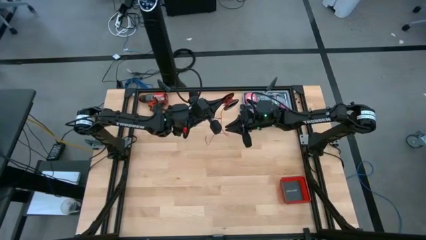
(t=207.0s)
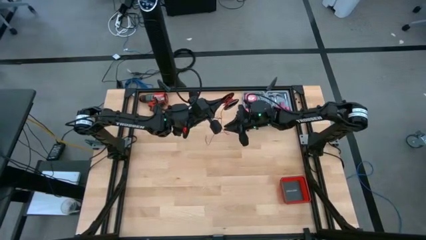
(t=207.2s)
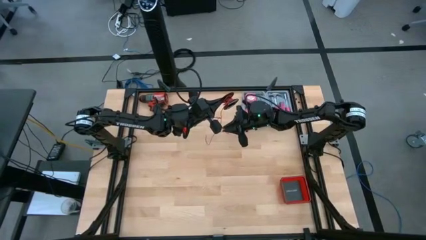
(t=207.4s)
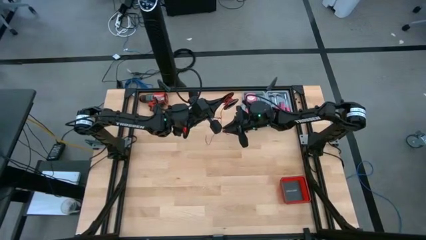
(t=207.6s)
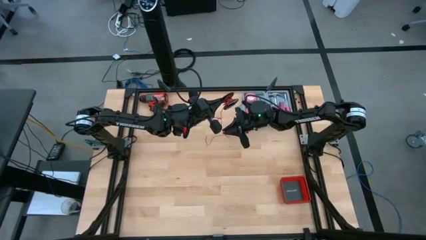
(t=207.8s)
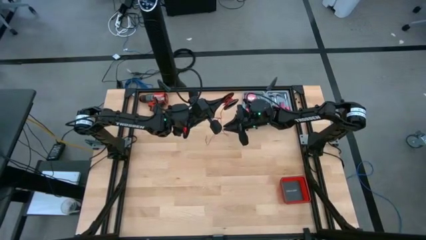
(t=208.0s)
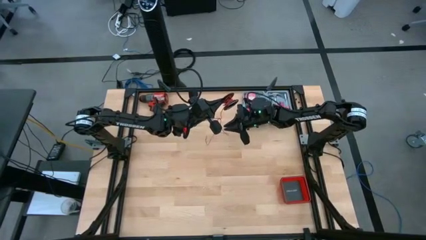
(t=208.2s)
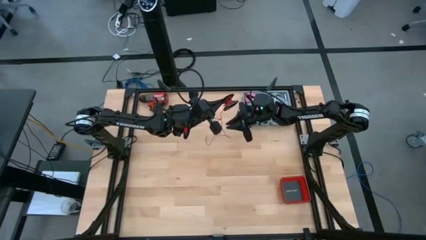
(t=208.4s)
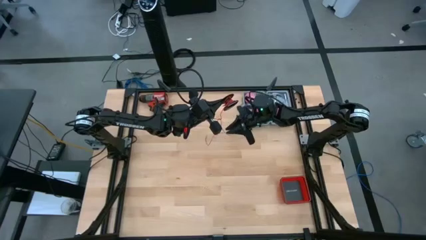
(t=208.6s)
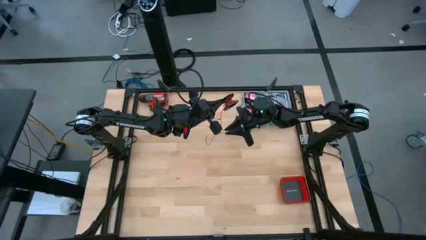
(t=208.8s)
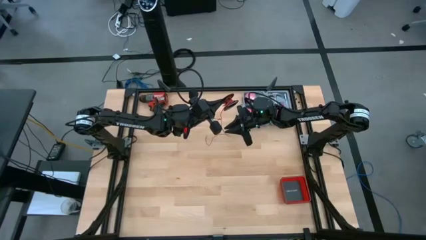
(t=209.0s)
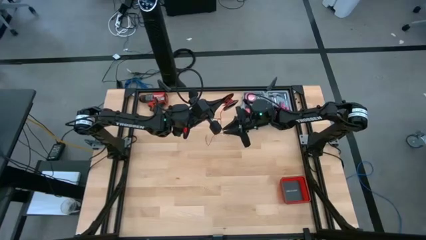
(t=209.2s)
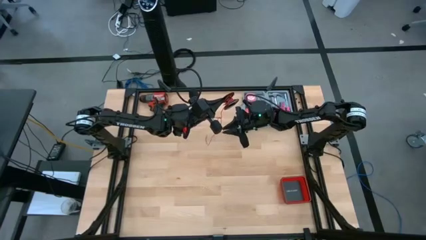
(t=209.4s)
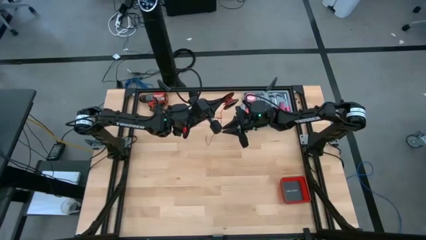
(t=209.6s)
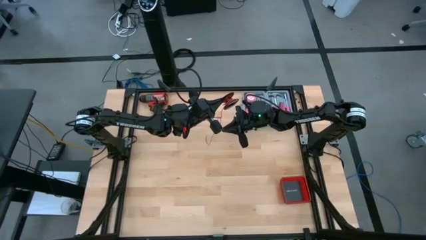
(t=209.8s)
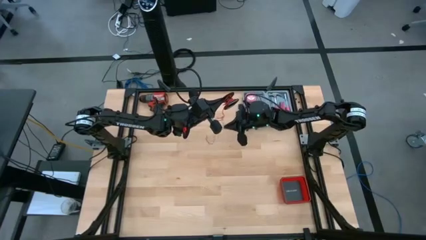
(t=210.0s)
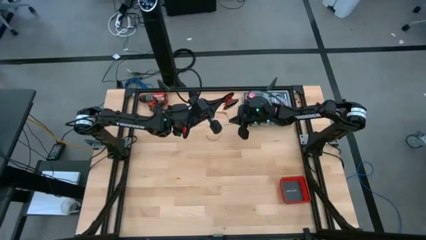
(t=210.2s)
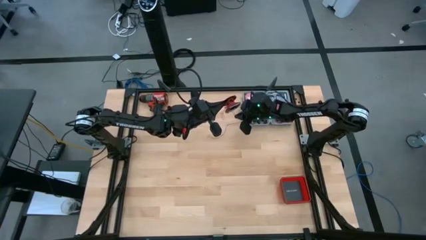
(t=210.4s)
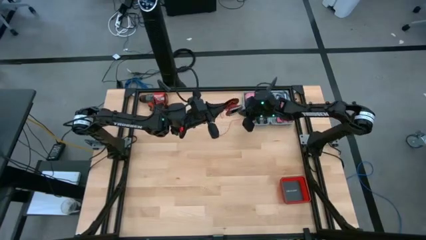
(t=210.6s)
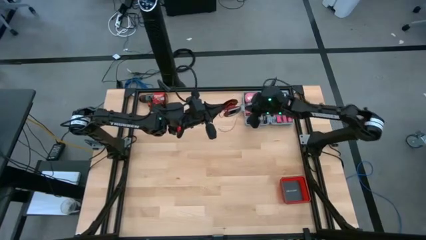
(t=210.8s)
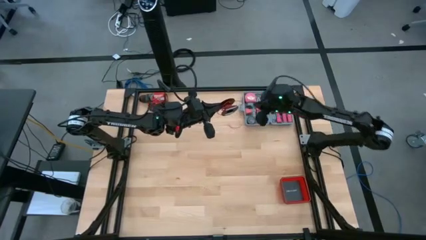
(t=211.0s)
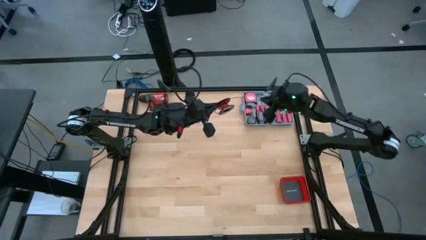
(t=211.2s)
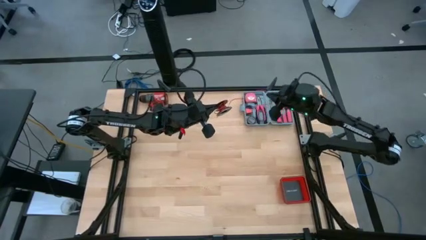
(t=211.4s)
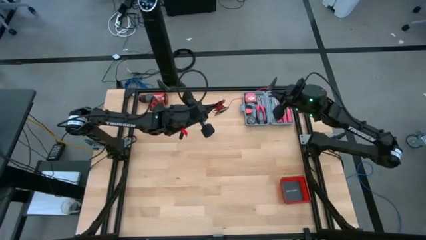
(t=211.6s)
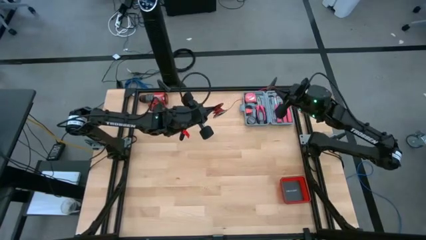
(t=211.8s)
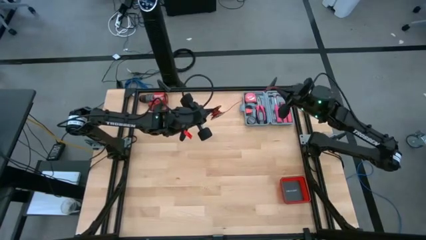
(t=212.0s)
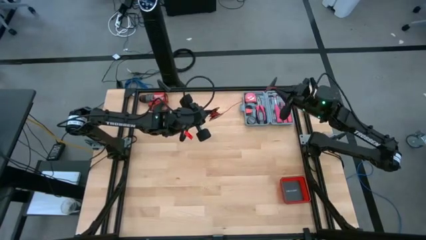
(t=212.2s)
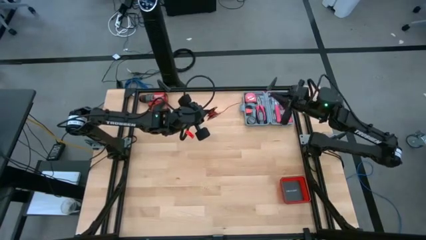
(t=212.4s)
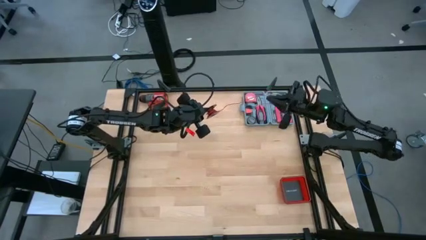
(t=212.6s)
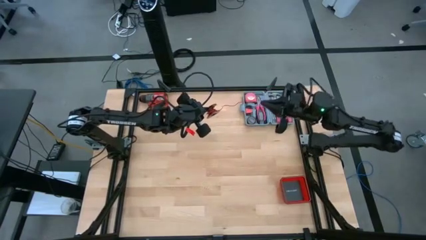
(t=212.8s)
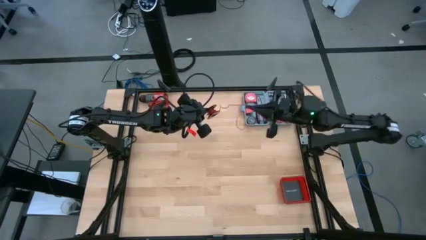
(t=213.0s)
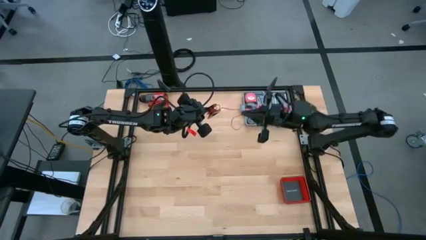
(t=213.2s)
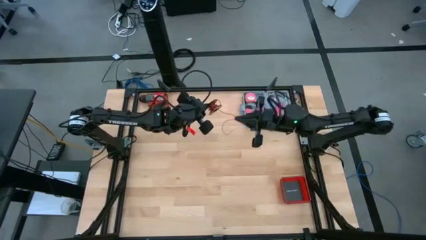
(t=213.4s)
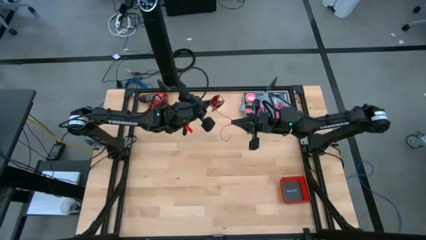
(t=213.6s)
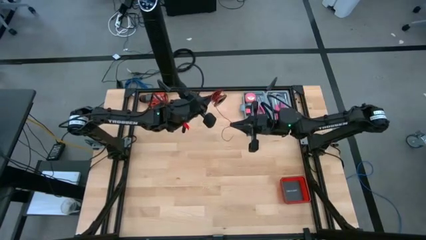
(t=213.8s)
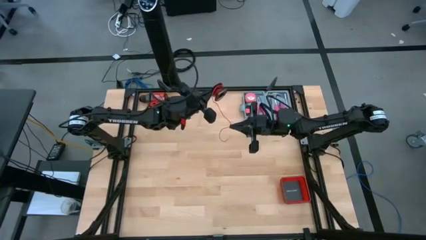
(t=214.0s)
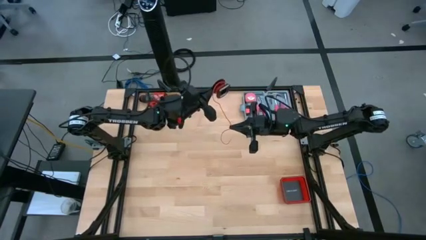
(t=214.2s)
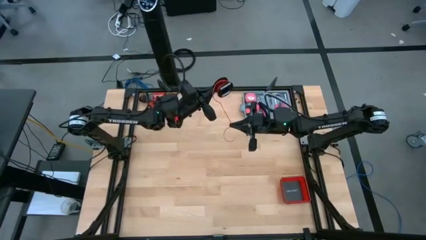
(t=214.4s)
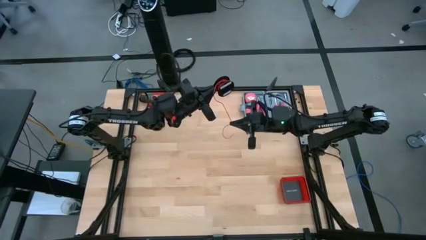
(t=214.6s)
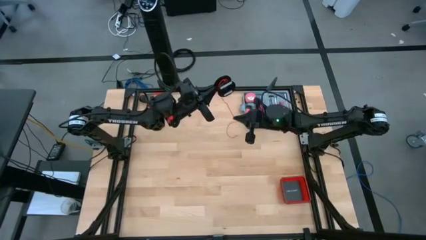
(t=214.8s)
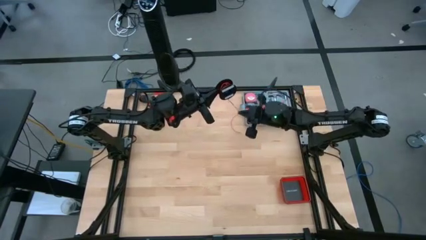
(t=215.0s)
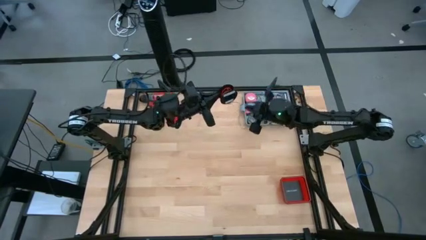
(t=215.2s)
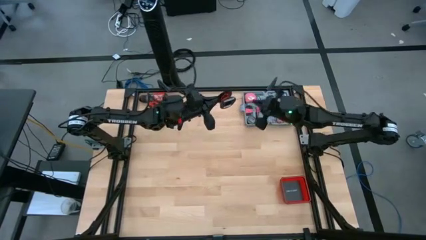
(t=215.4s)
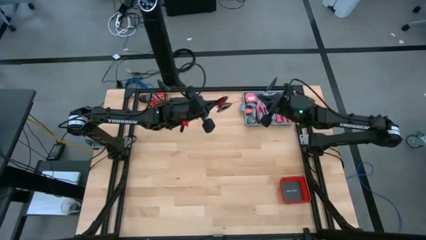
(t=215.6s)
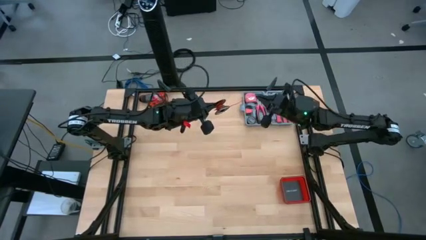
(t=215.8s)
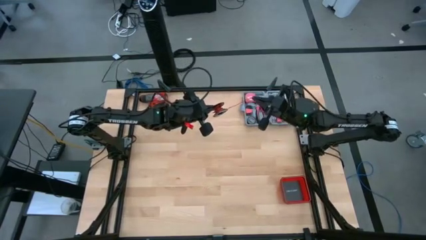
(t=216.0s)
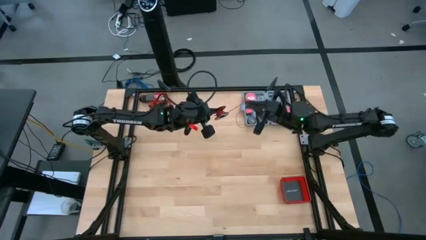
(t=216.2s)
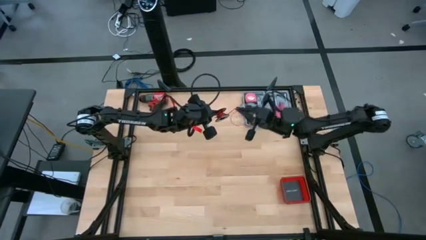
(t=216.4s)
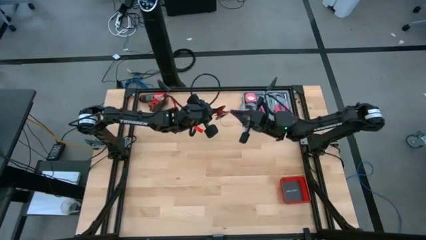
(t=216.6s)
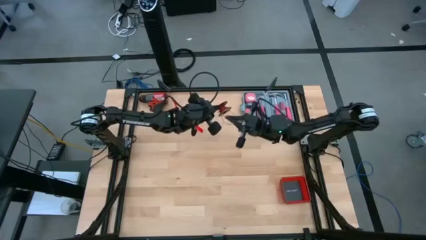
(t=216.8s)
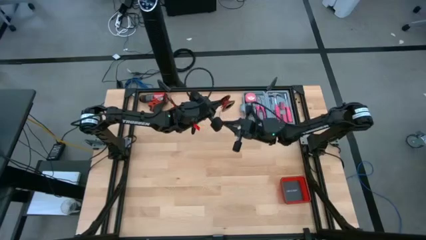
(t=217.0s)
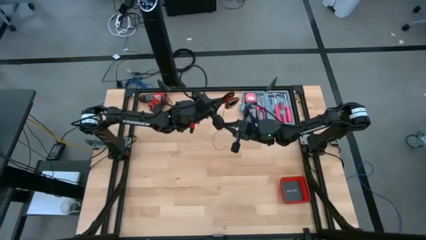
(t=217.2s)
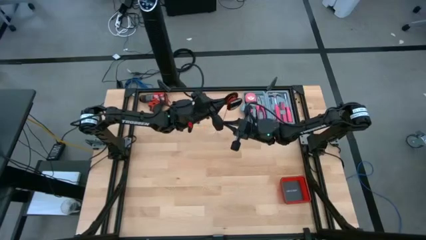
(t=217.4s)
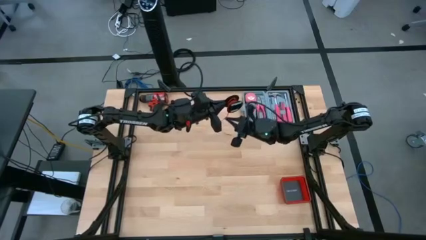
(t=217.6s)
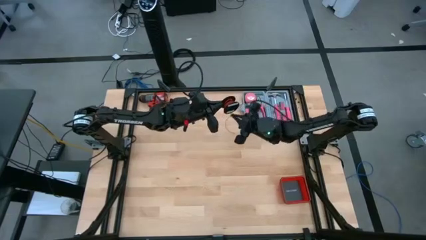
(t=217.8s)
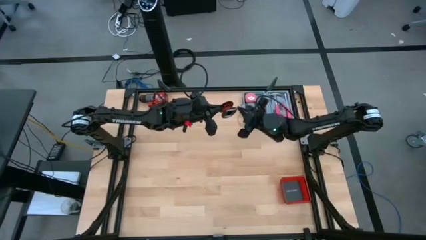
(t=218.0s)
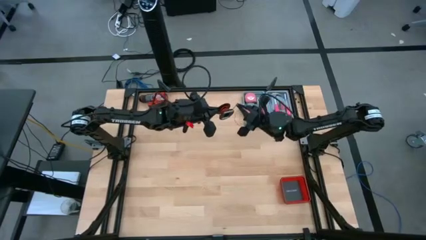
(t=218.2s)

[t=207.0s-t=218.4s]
Task: Coil cords
Coil the red wire on the black spool

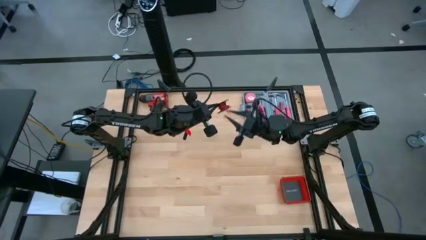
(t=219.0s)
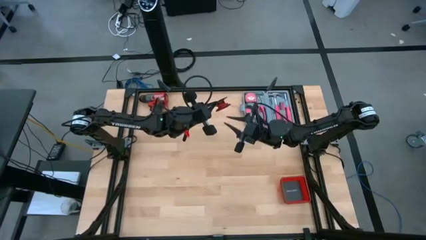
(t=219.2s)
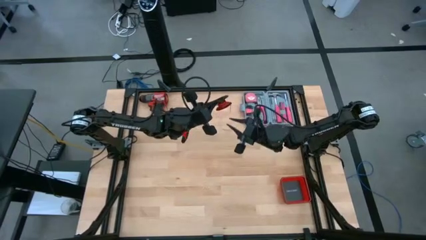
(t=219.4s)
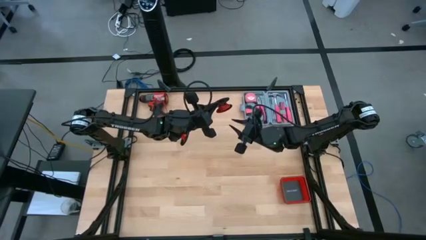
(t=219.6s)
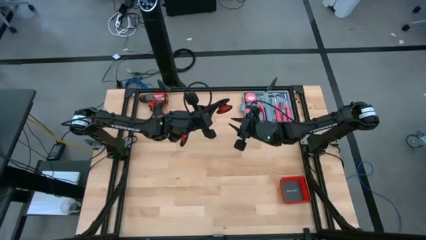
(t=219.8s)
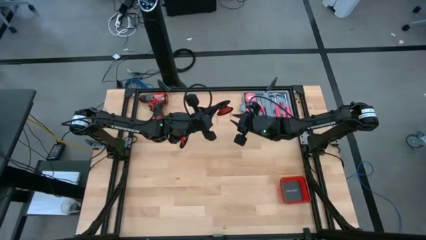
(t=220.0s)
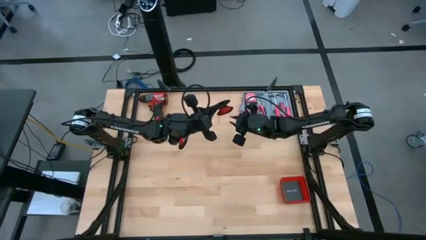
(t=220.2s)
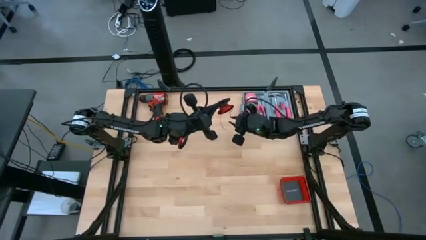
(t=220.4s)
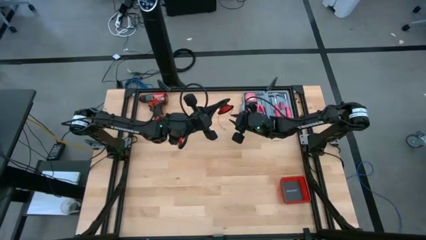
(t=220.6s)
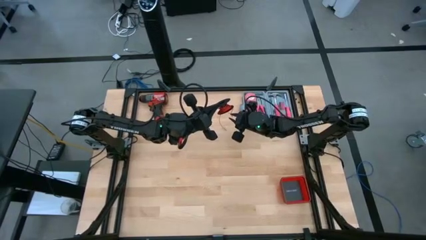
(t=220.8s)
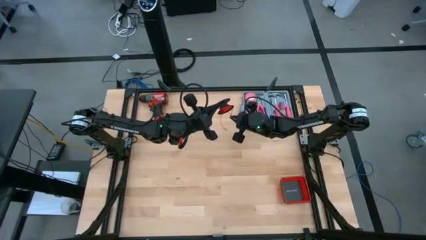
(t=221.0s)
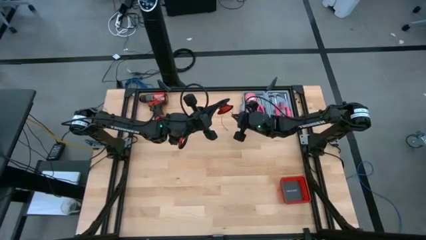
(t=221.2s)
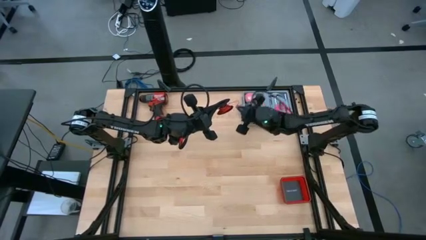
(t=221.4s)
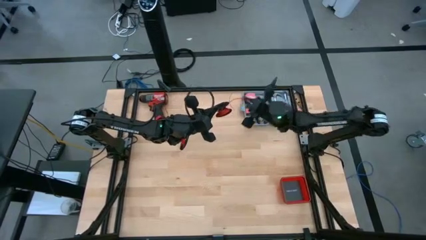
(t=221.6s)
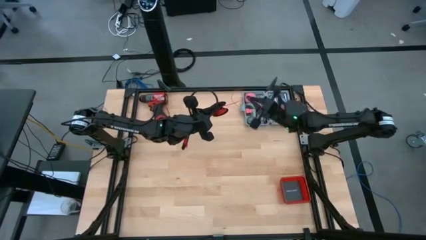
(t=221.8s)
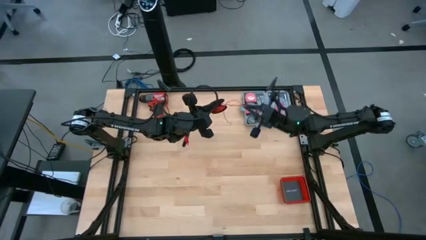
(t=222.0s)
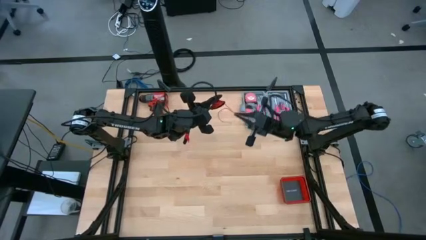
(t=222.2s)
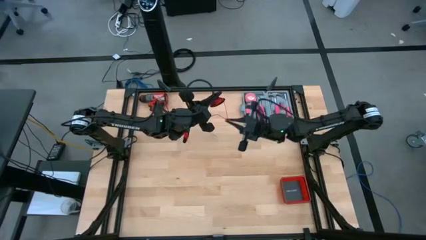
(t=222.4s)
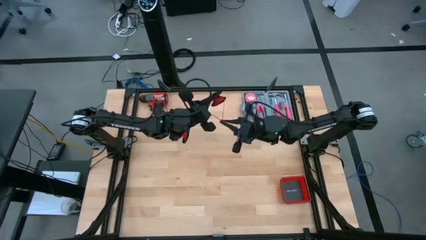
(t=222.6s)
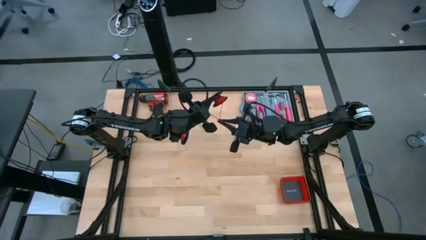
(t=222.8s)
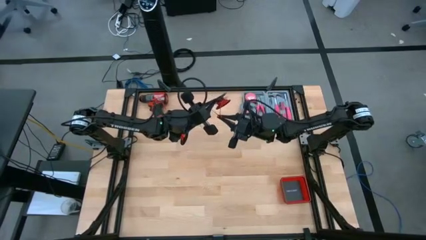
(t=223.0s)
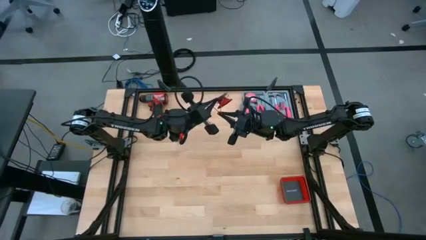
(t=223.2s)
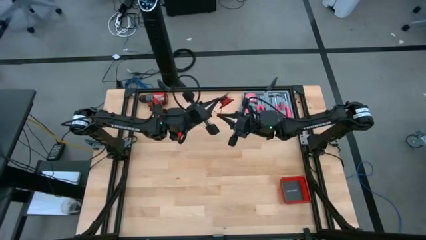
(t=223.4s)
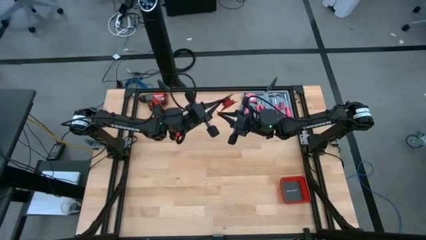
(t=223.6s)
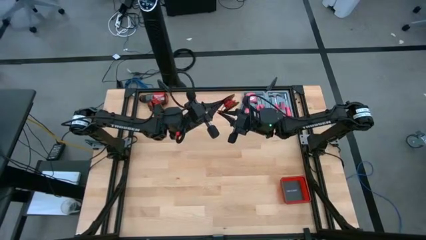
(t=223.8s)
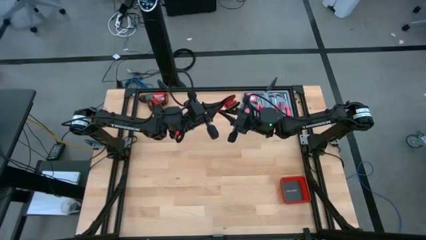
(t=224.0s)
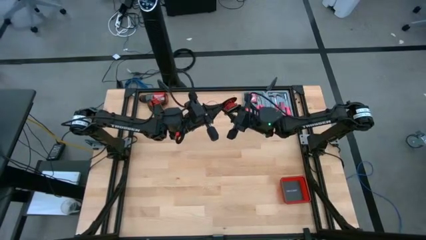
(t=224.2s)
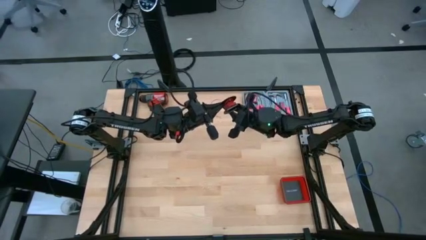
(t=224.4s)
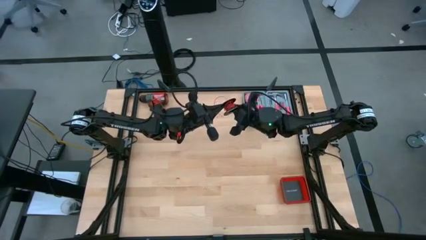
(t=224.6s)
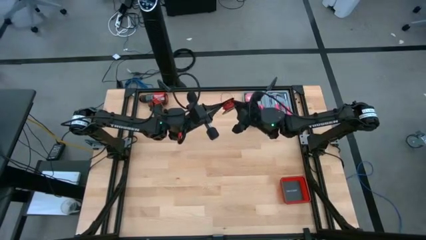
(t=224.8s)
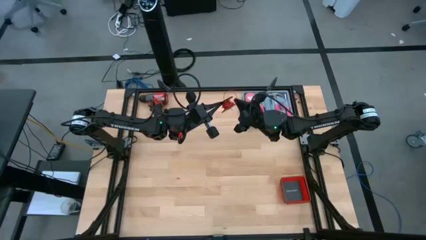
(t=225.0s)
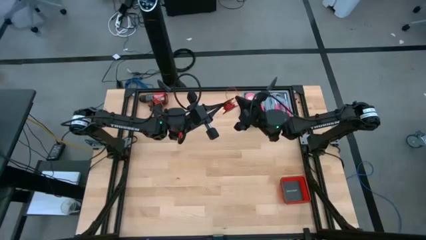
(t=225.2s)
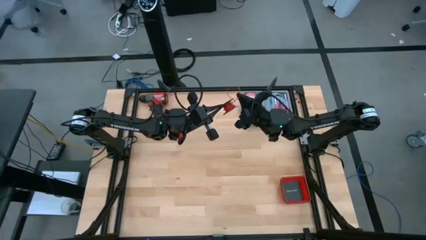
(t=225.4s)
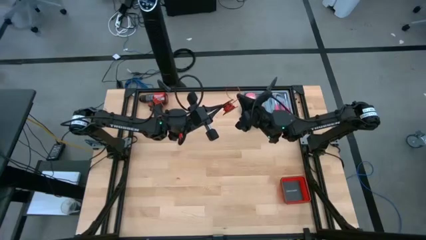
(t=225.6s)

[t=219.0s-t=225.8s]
Coil the red wire on the black spool
